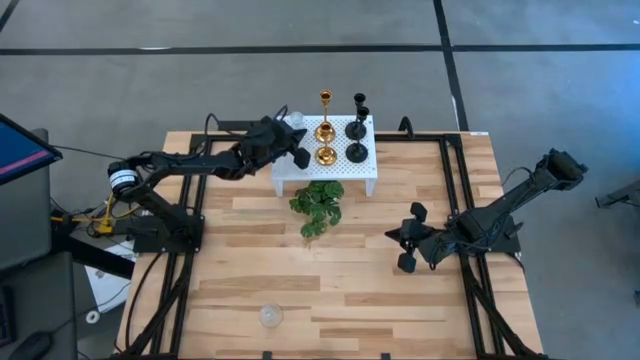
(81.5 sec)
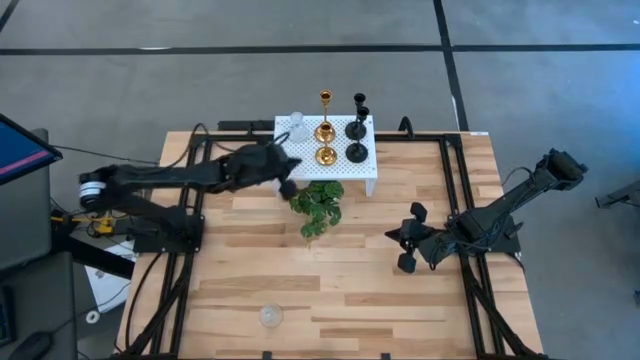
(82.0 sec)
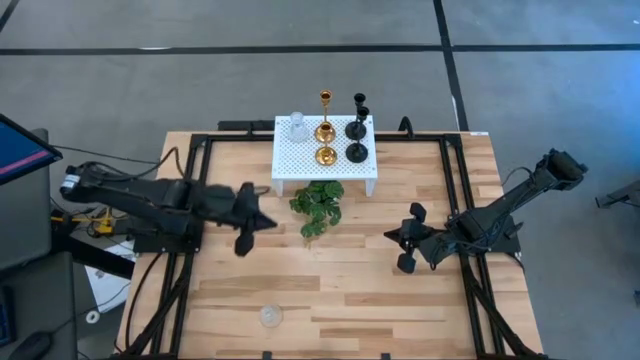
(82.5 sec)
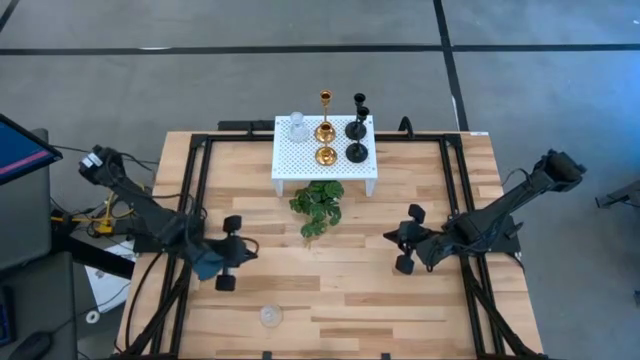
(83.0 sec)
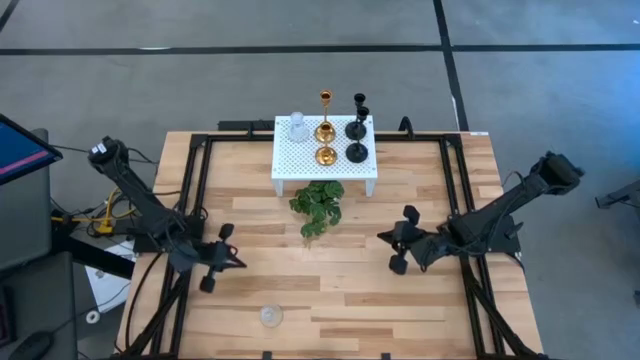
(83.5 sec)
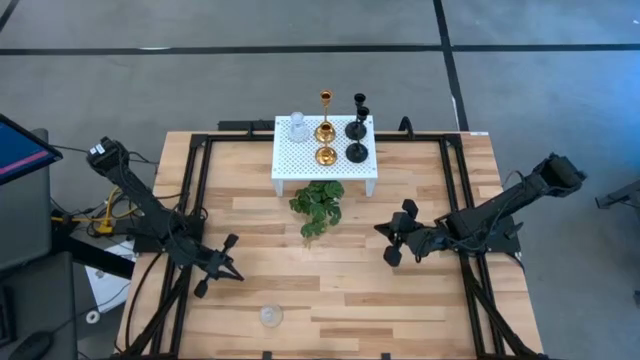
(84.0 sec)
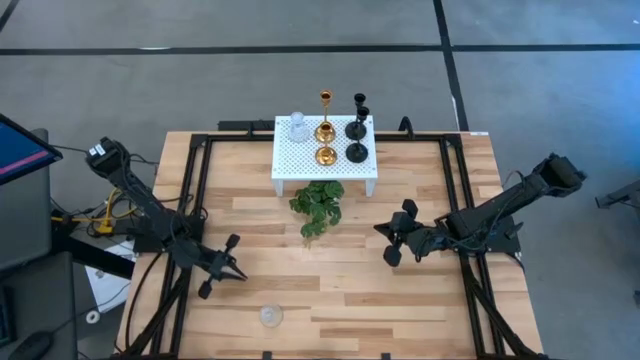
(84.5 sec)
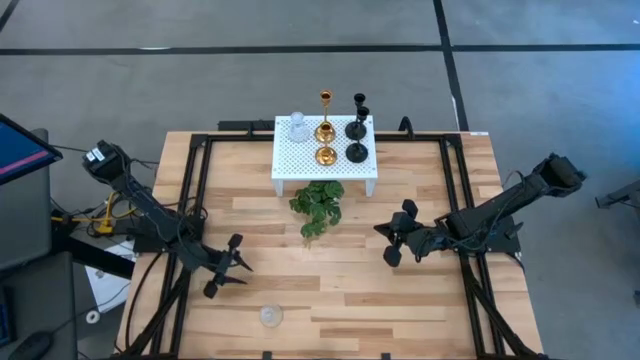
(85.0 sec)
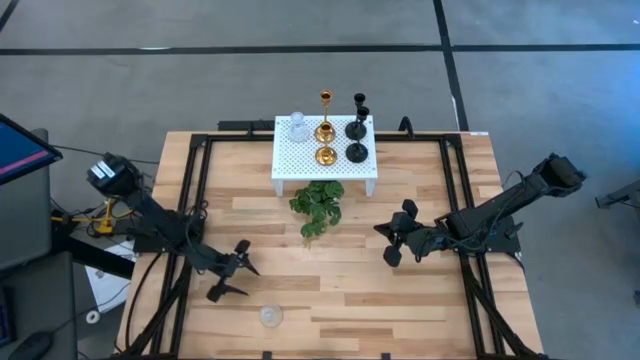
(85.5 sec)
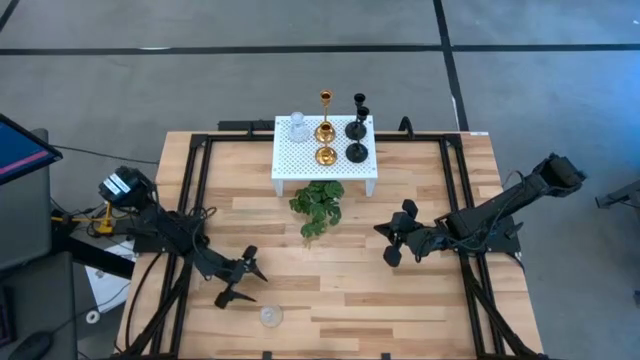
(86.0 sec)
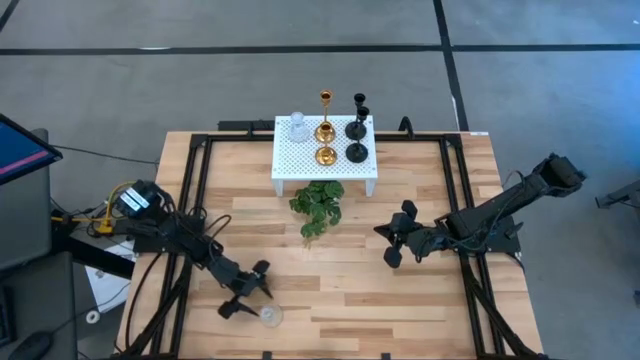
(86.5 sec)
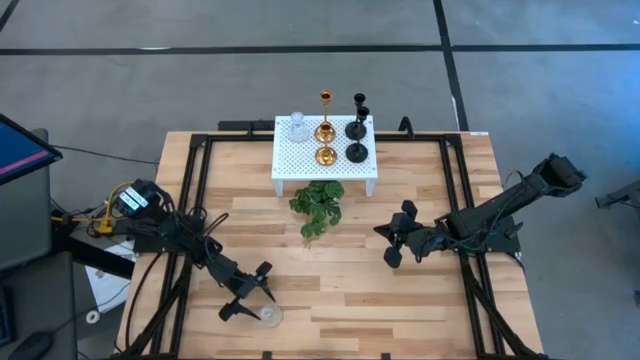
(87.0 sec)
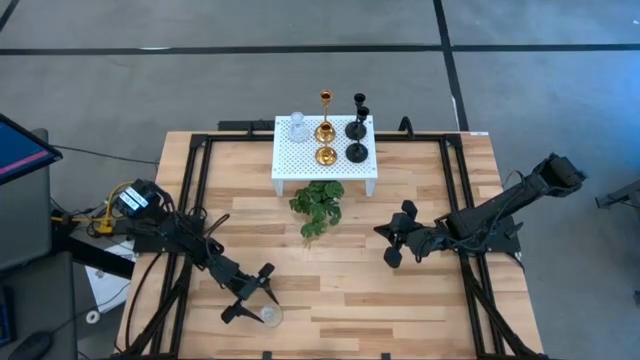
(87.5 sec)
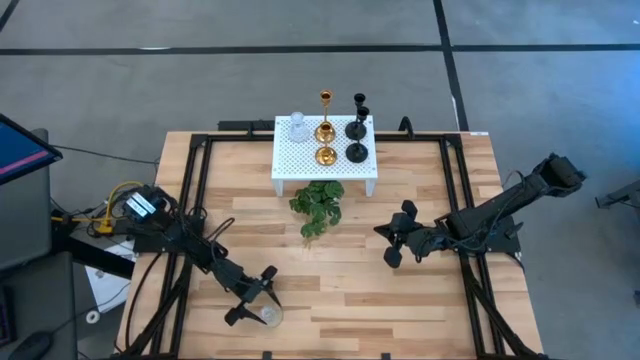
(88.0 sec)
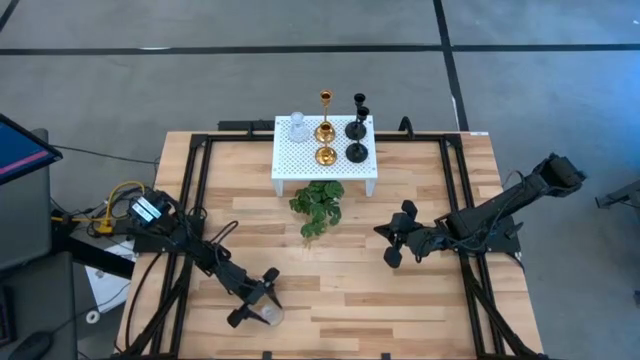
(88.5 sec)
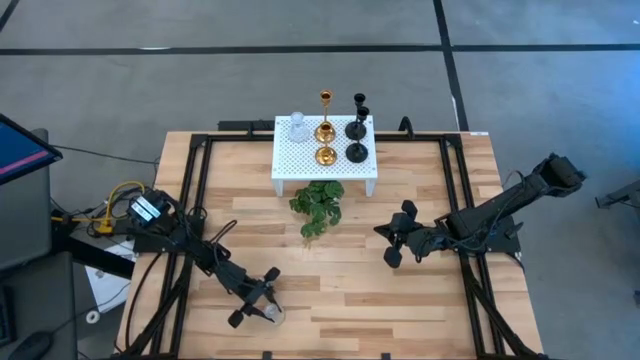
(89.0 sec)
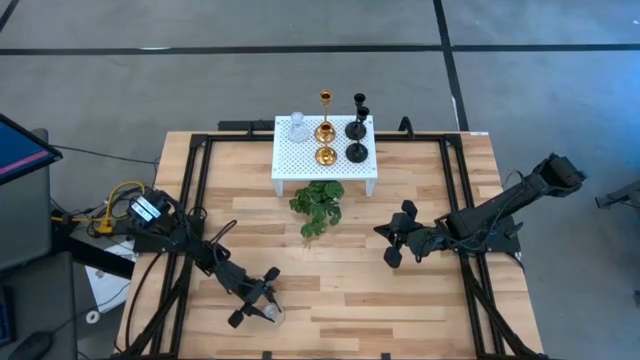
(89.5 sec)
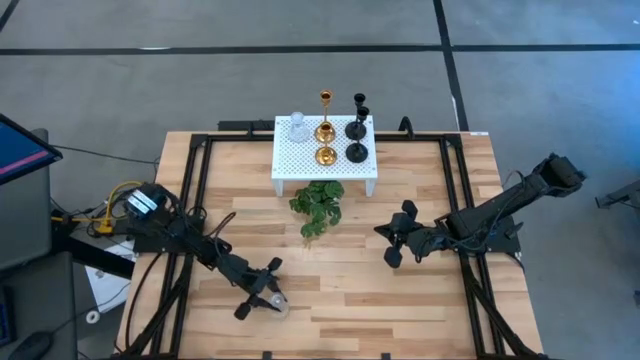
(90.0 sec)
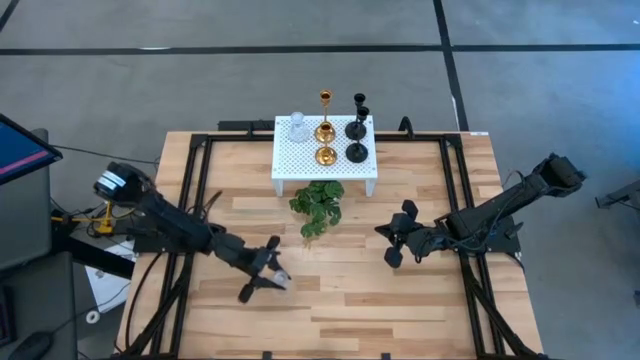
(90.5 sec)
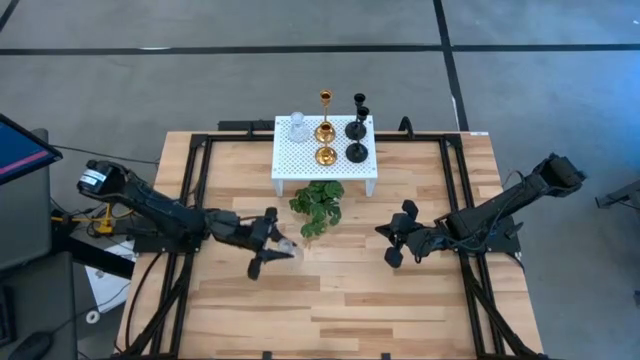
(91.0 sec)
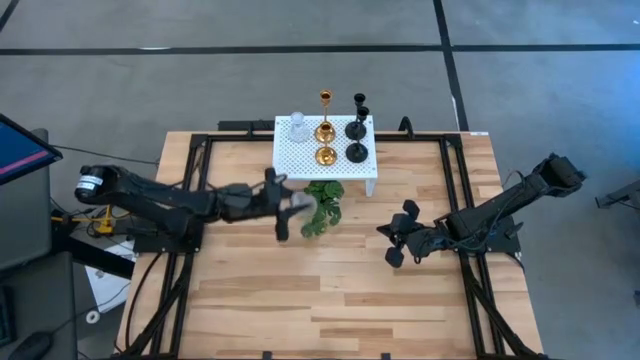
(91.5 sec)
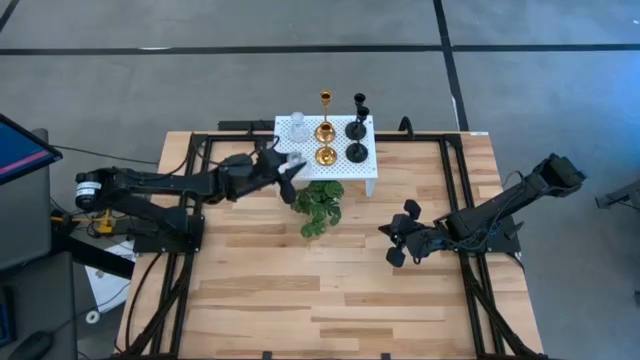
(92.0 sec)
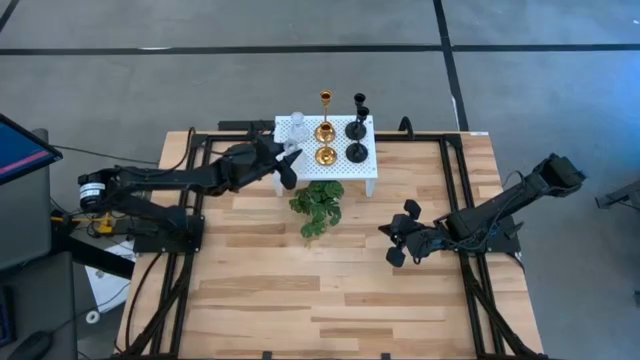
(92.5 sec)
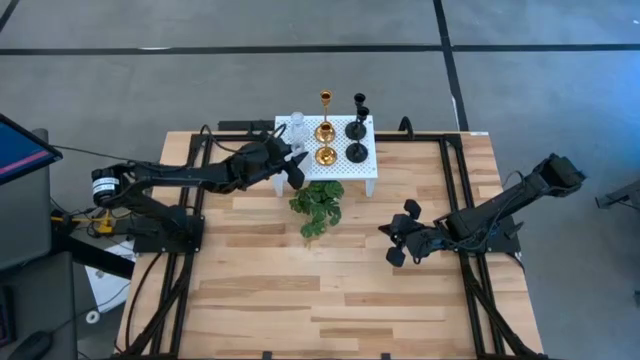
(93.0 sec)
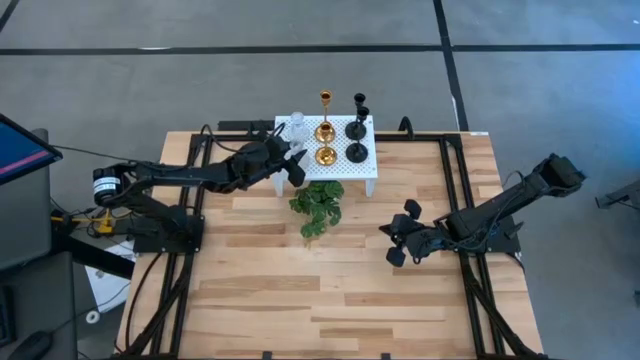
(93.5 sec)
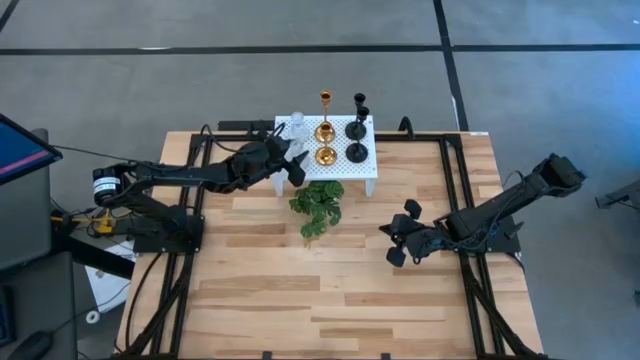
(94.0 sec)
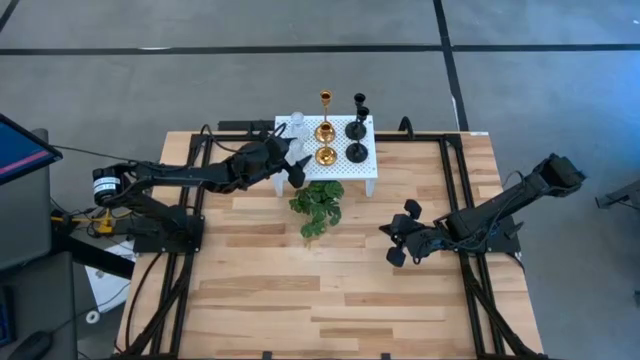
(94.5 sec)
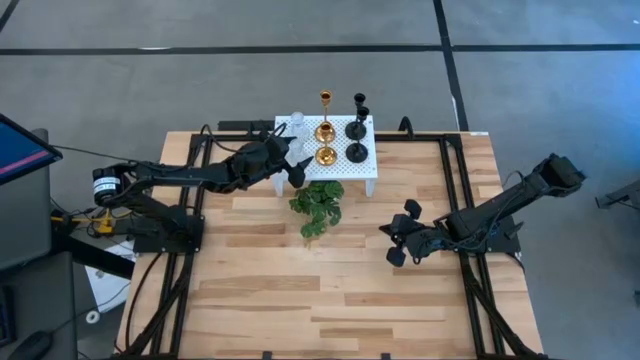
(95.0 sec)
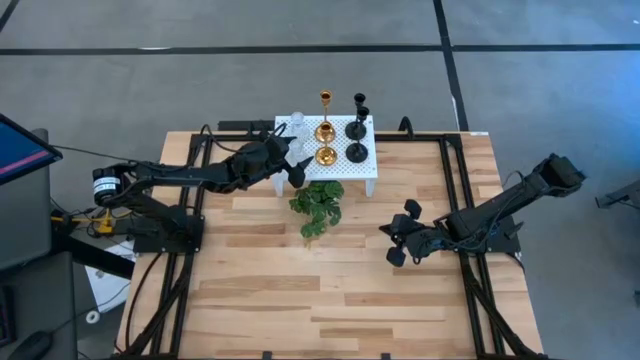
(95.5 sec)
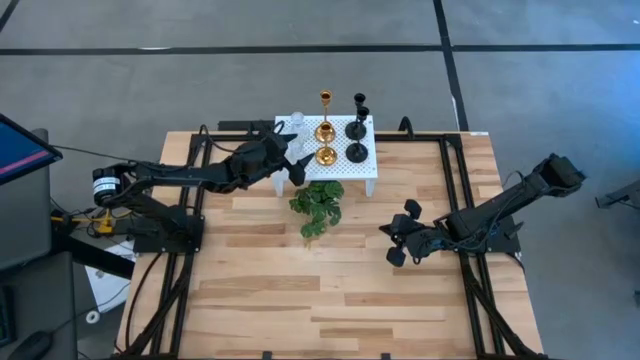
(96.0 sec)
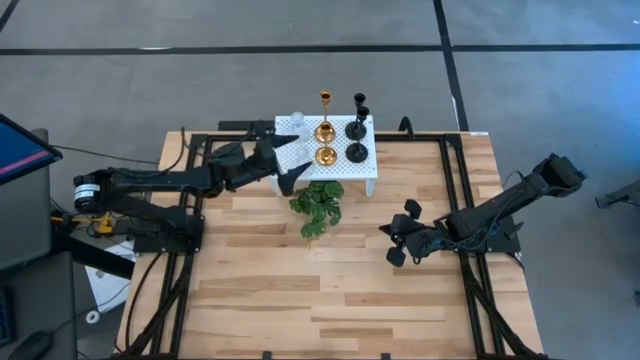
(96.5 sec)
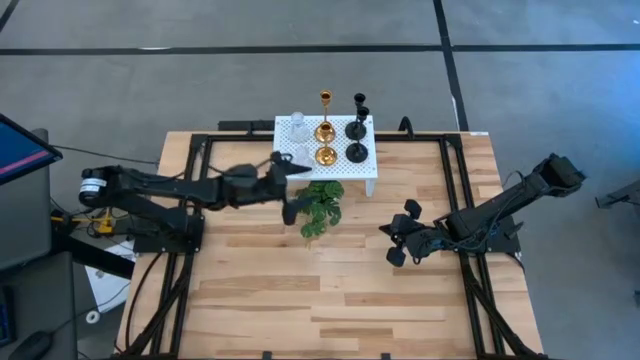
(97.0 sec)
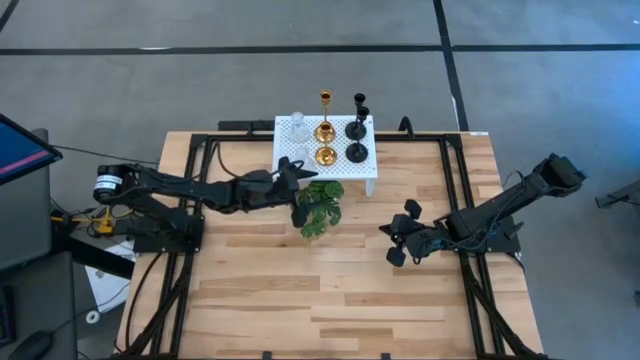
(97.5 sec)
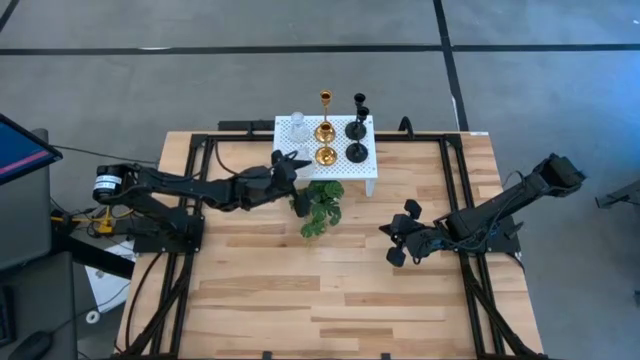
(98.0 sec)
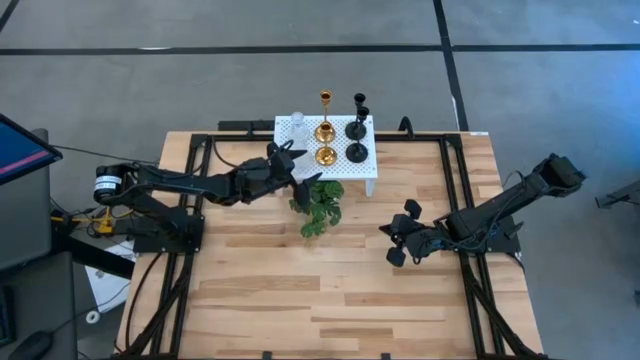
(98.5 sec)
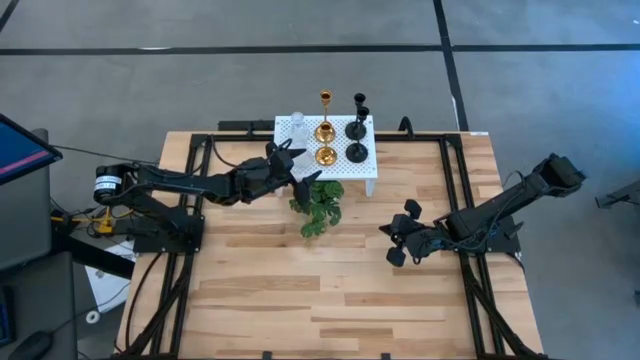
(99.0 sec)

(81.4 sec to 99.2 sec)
Task: Pick & Place candle stick holders
Put the transparent candle holder on the shelf aligned with the other transparent candle holder
